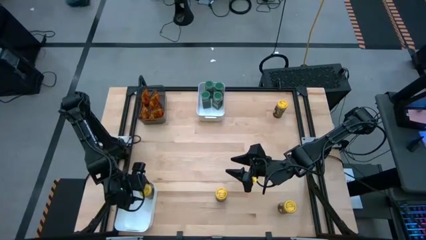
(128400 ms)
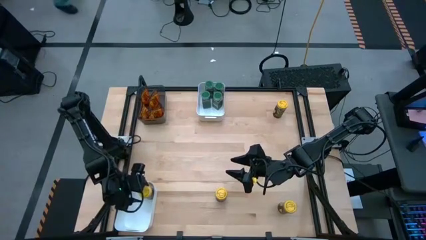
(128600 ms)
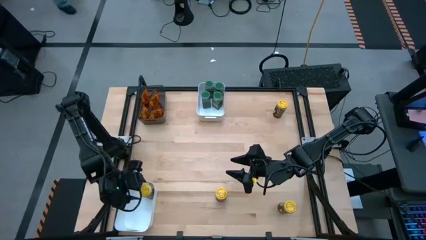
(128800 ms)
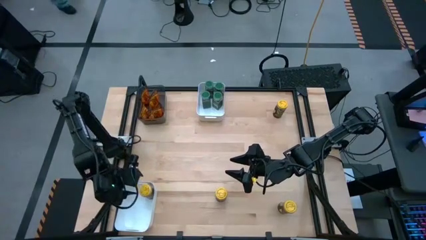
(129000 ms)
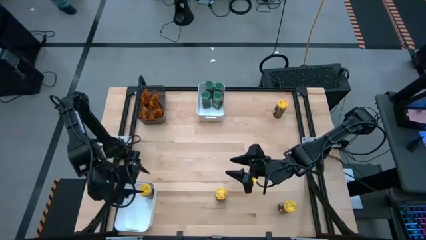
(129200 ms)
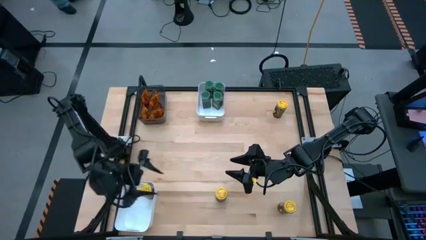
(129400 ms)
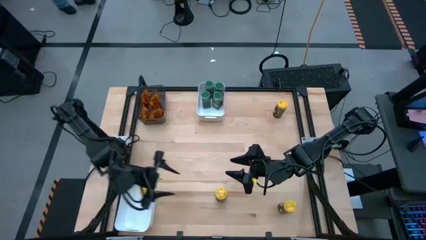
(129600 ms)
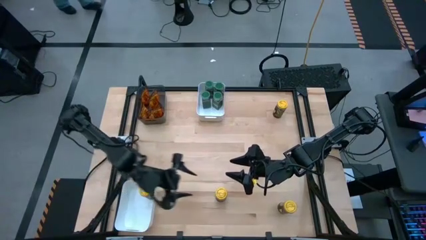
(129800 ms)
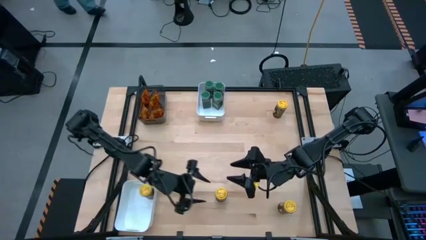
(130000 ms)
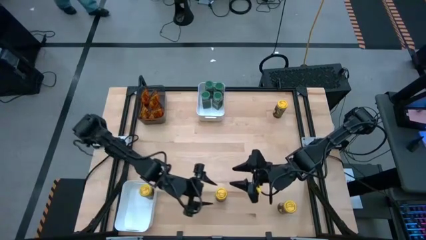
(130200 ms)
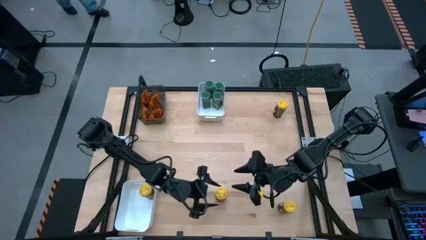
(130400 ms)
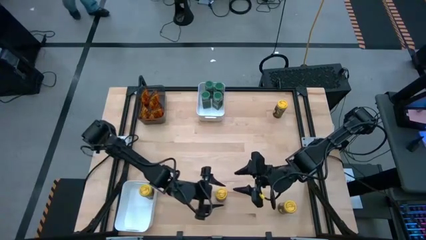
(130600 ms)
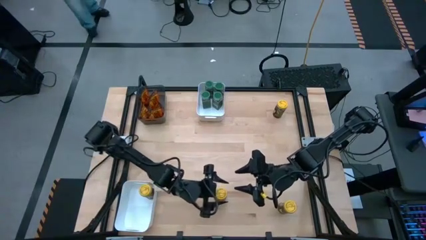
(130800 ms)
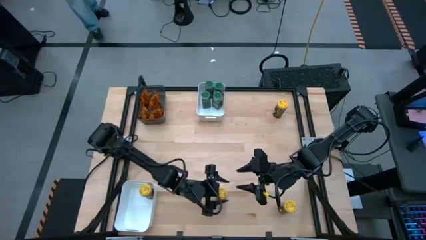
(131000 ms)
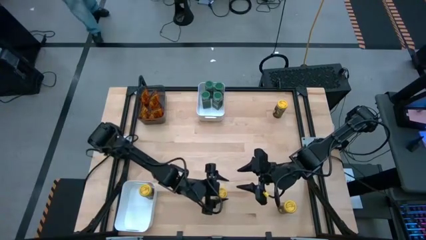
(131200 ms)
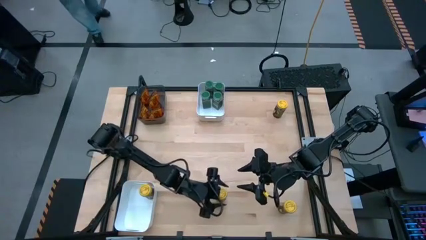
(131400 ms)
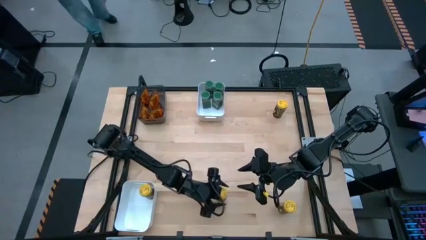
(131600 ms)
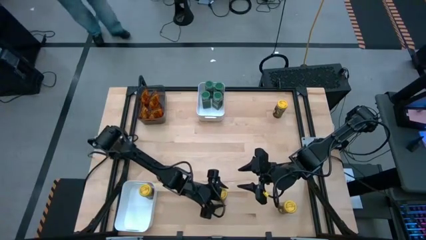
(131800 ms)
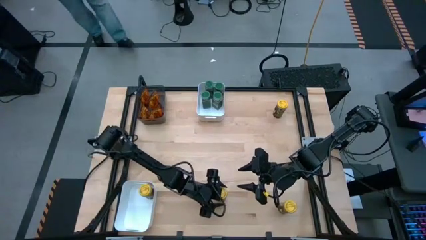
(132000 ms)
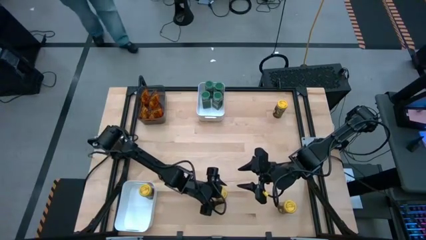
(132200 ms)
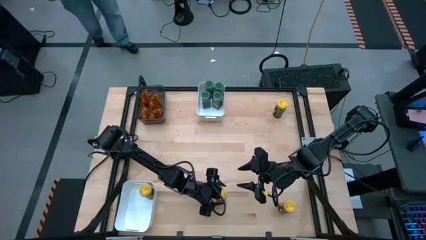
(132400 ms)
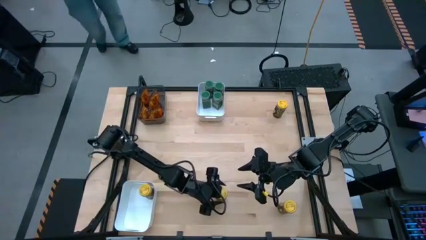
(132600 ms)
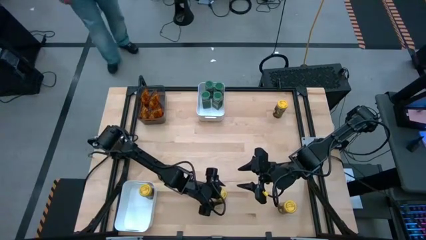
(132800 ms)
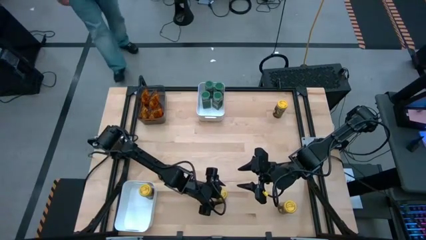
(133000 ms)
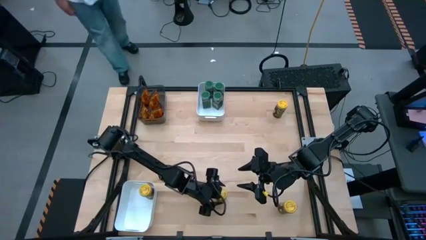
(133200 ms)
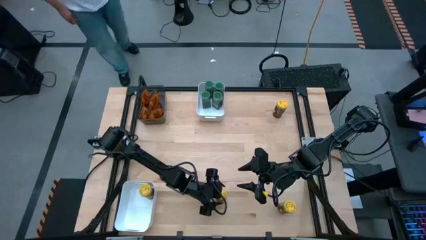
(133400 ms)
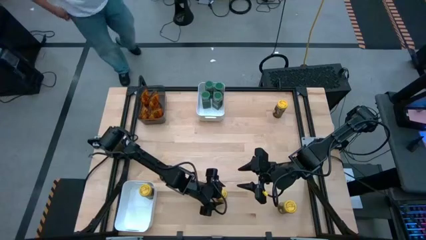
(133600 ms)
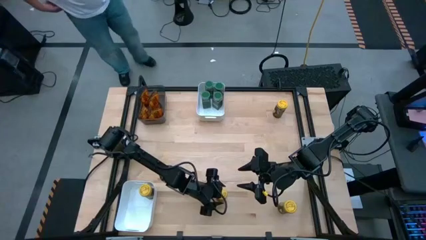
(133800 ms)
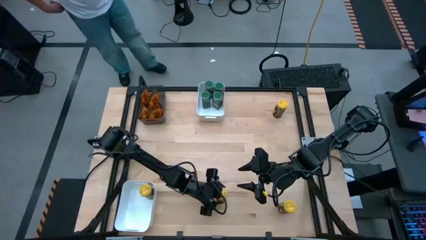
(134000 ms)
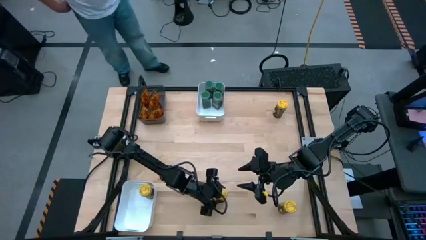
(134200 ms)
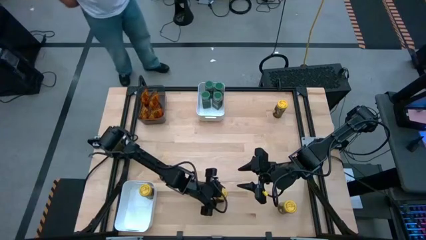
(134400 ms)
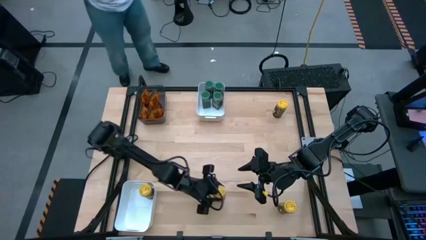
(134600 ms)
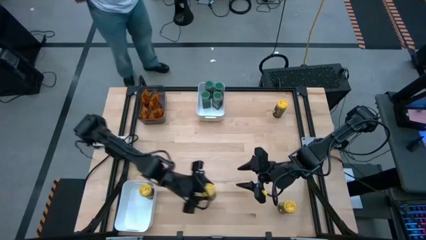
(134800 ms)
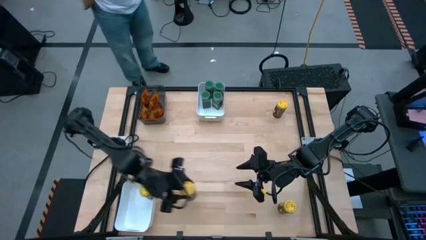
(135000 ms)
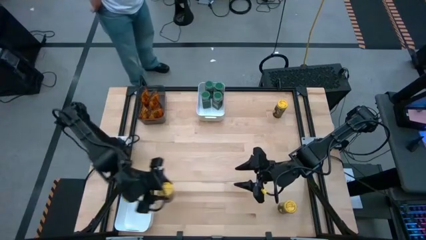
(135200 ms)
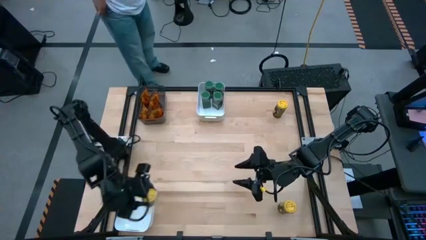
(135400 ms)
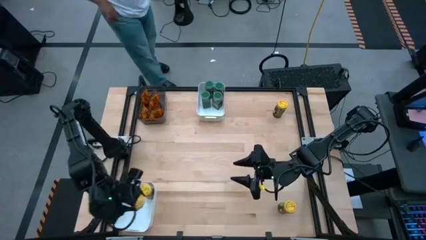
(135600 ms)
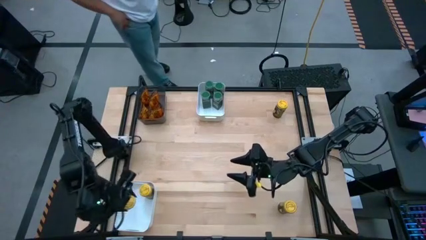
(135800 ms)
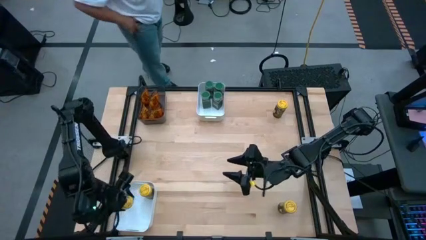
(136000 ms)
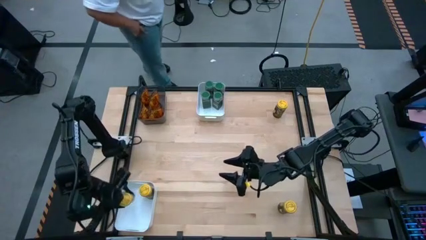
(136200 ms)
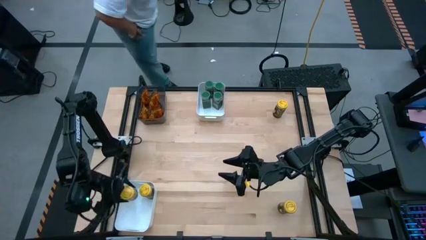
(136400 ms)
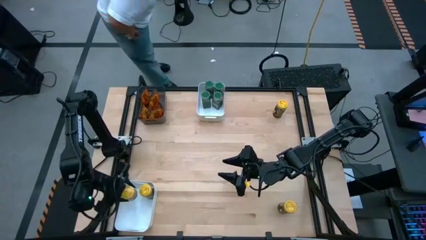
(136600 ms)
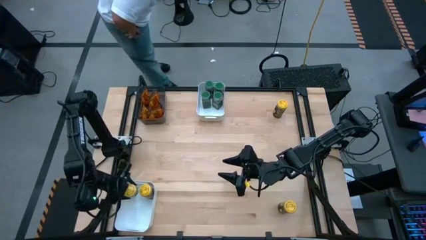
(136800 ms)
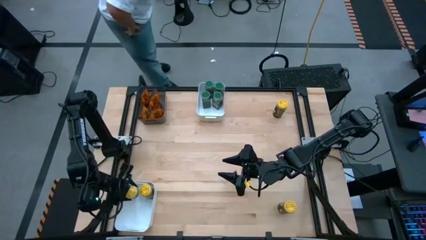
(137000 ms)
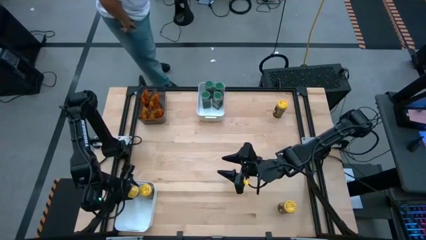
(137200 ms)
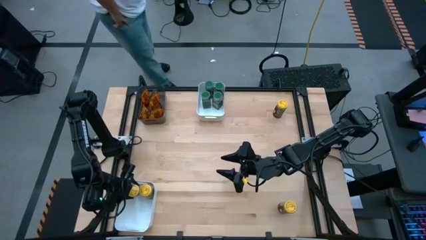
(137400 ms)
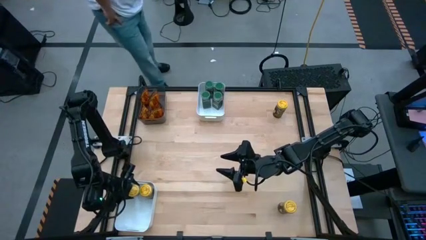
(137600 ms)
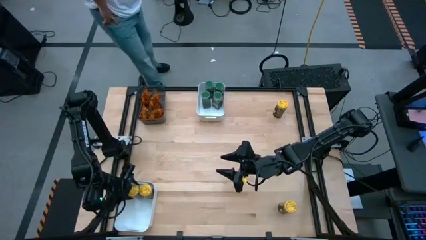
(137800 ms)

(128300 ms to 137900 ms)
Task: Sort spices by type
Put the bottom left yellow seasoning bottle into the bottom white bin

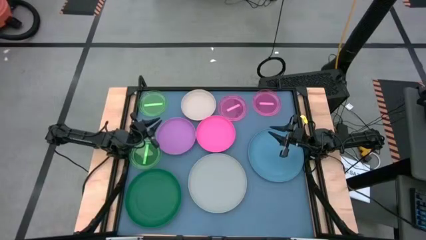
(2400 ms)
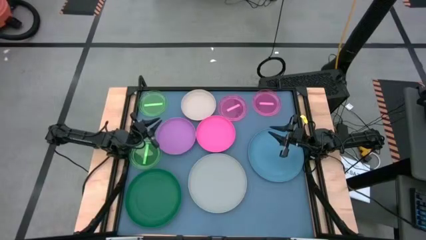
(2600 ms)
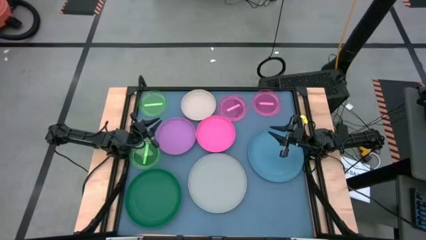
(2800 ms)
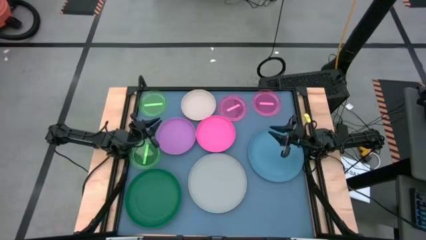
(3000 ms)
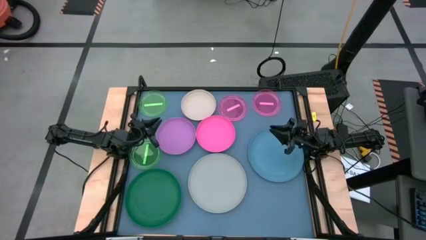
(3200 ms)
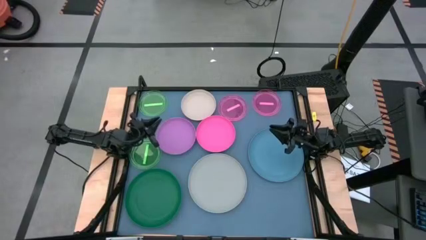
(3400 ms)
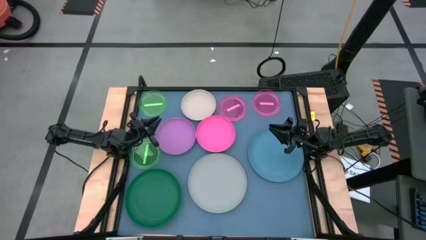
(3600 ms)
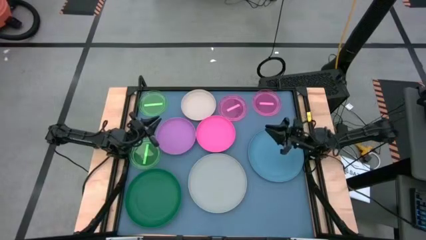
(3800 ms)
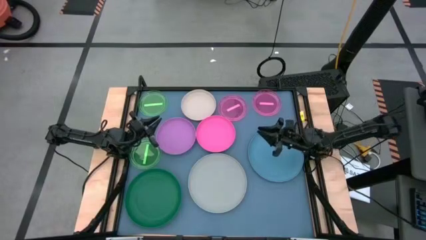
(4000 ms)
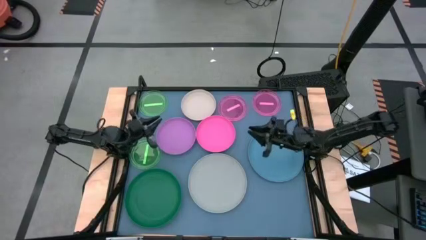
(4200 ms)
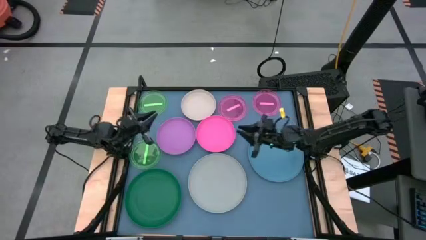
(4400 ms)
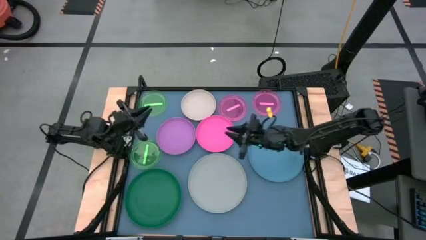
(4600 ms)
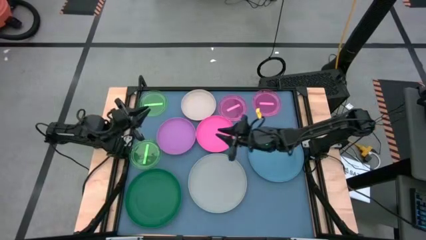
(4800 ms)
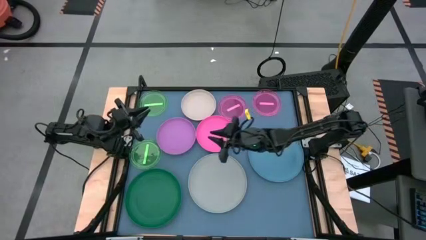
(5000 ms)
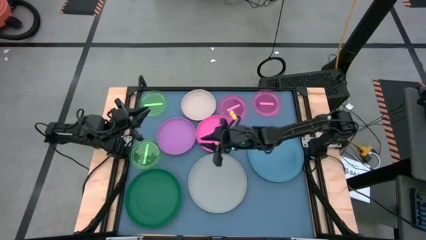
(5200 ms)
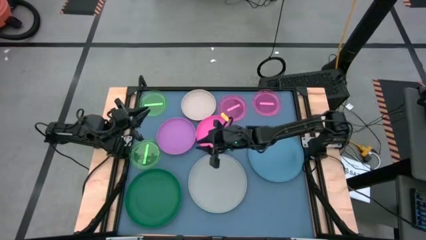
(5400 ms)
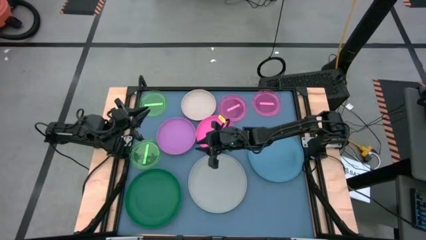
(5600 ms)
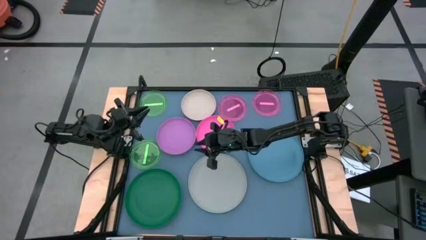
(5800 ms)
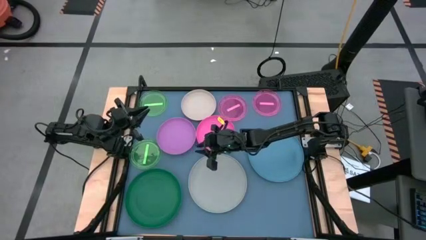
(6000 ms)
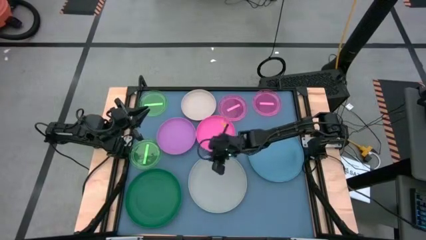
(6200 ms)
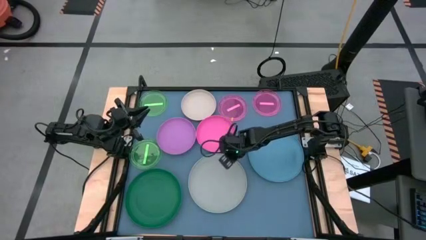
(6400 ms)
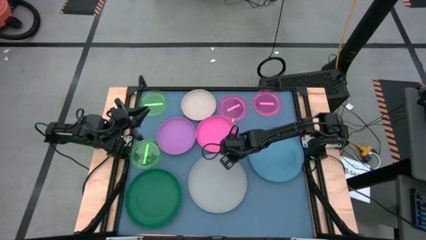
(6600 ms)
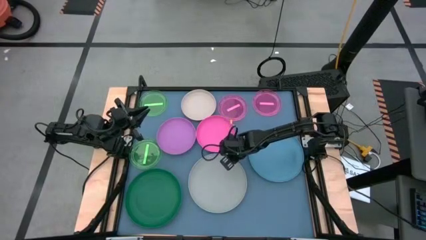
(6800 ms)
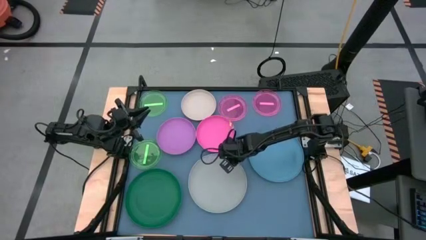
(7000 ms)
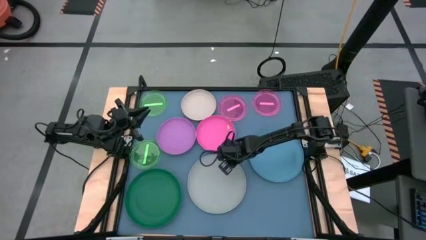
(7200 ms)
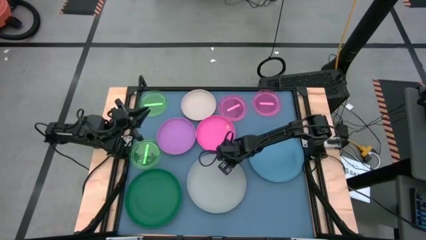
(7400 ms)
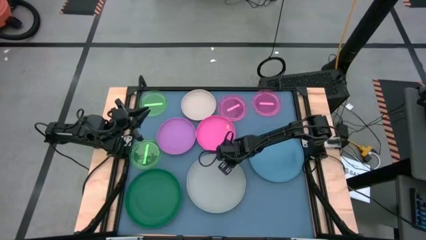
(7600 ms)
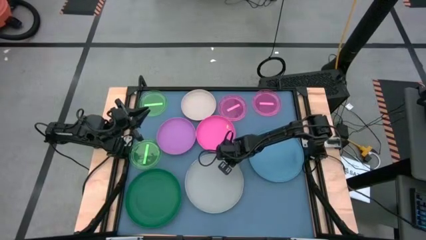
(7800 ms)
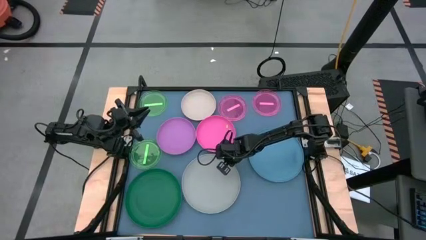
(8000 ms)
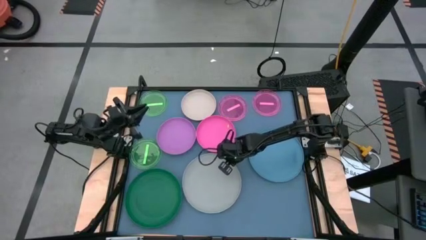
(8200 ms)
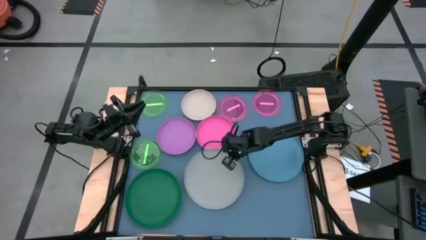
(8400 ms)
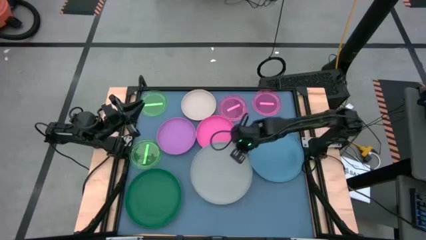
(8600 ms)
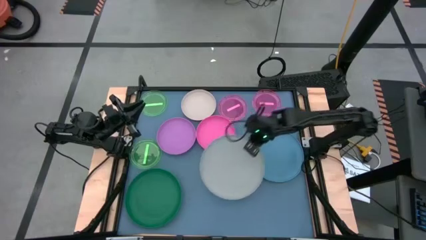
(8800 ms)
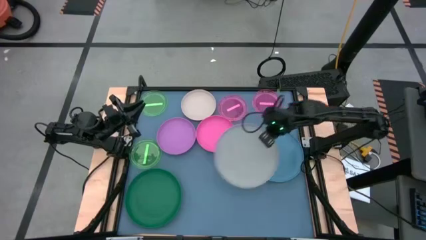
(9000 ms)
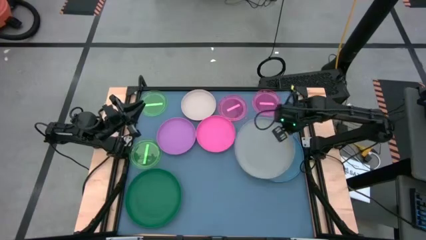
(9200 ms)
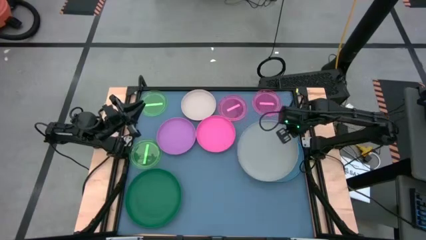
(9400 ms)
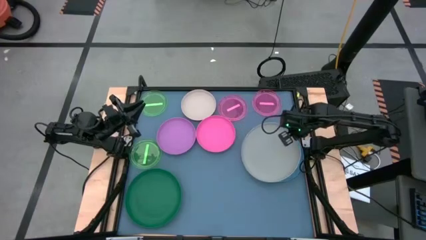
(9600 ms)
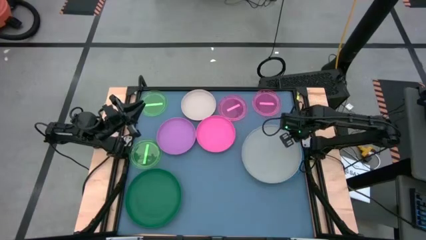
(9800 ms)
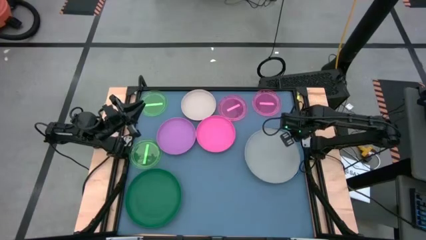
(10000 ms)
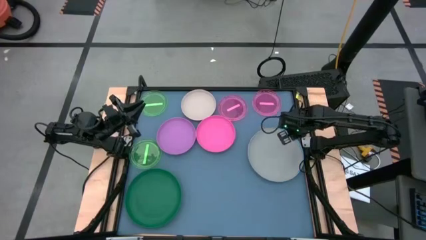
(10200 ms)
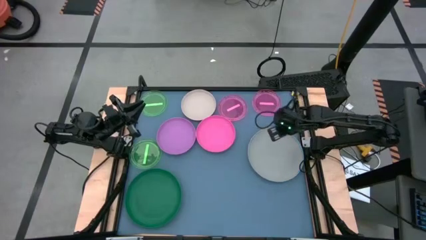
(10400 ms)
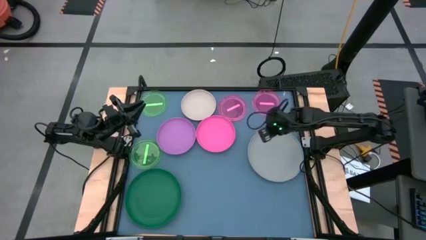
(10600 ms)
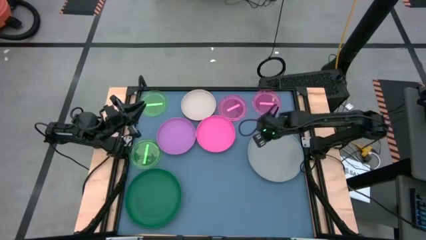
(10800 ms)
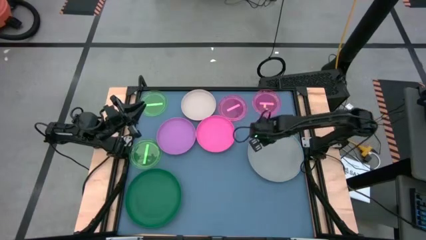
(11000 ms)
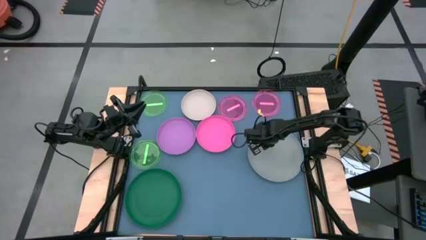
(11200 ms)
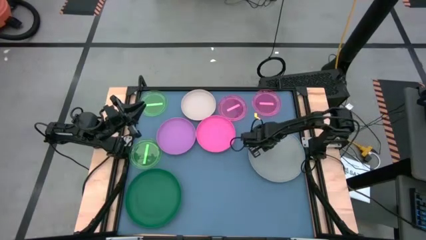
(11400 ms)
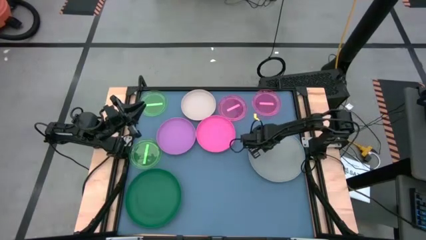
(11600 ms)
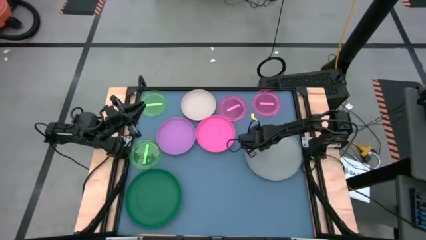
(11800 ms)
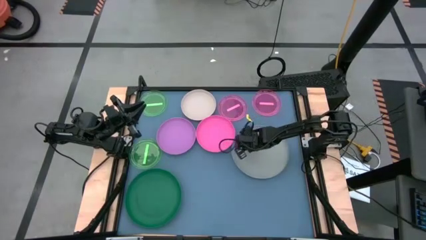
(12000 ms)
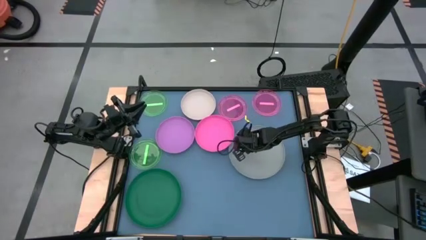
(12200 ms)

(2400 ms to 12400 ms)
Task: Stack plastic plates
Stack the gray plate on top of the blue plate
